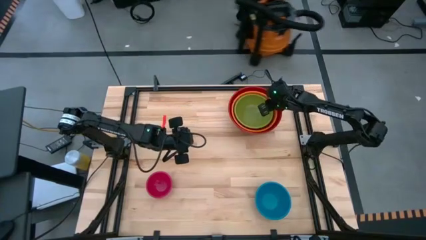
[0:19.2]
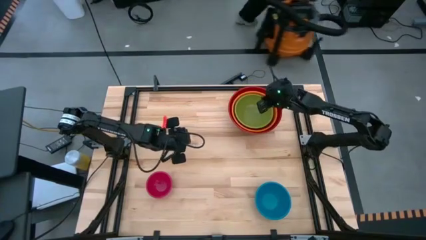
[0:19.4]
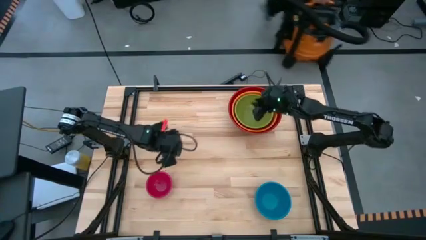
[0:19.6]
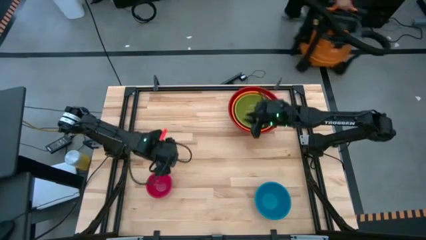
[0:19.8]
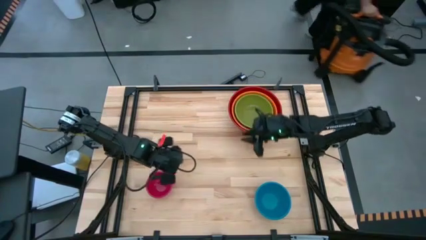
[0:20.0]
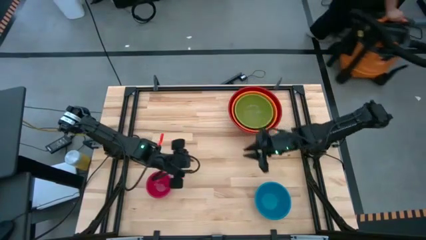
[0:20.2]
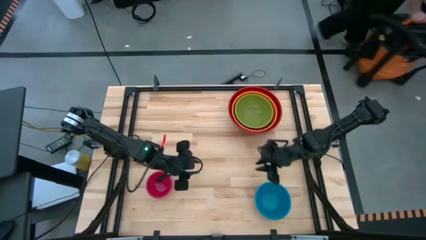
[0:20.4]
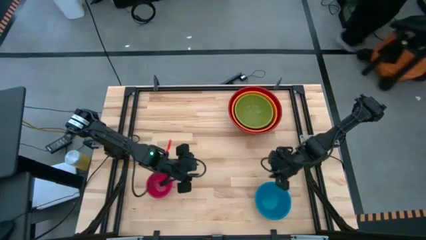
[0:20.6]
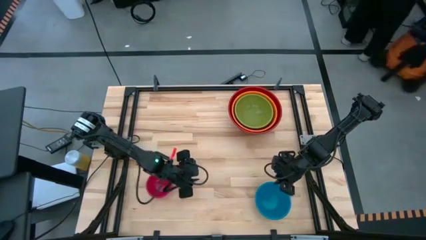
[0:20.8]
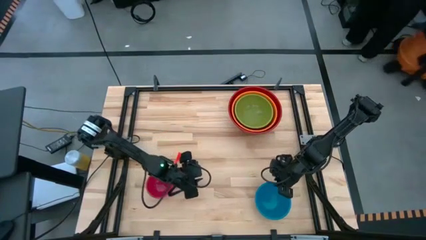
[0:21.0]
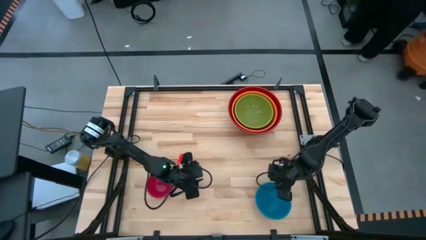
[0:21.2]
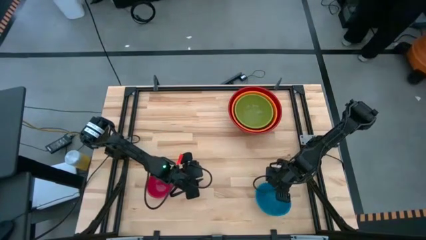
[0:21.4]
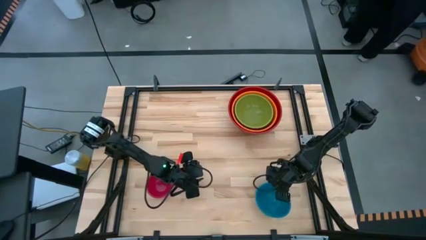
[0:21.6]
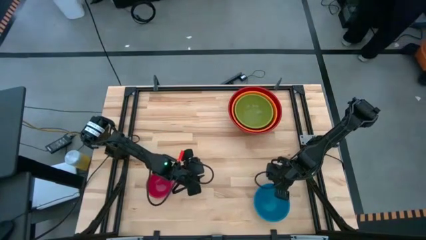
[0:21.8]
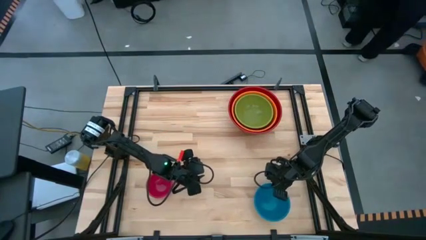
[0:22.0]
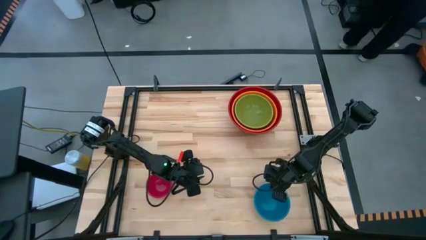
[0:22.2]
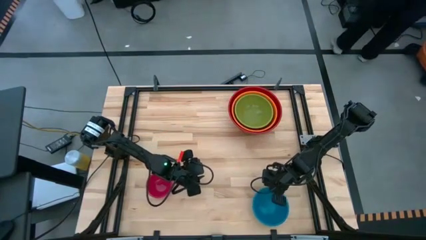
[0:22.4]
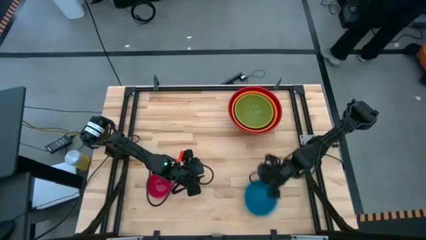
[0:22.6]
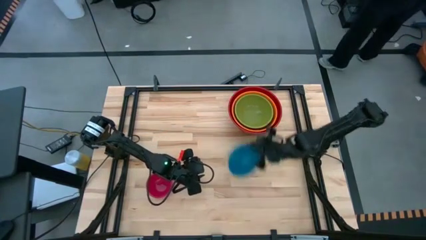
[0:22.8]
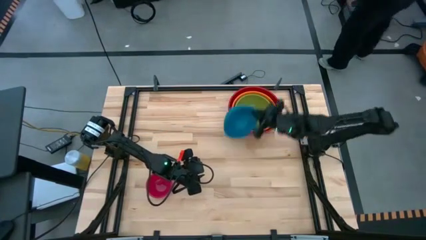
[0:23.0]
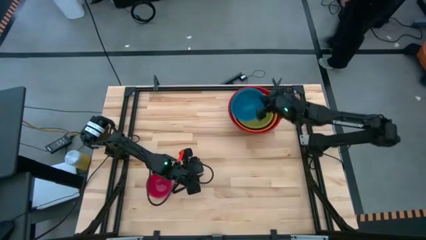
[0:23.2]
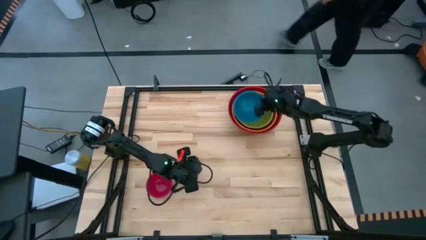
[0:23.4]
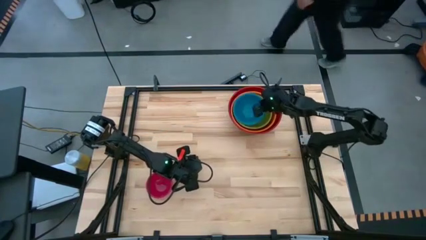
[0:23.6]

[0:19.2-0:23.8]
Stack the blue bowl on top of the green bowl

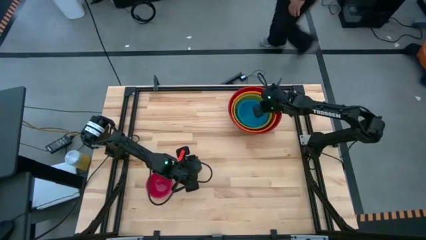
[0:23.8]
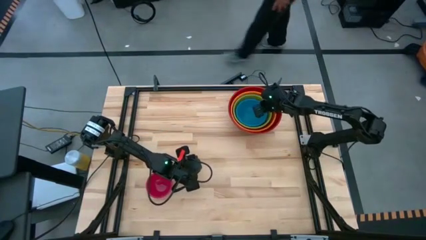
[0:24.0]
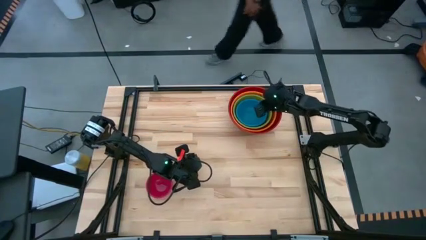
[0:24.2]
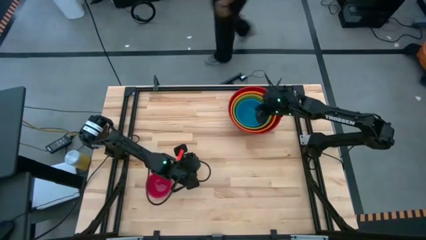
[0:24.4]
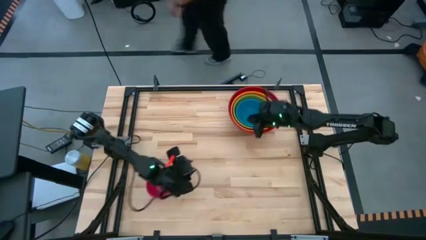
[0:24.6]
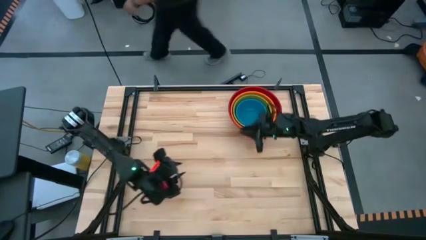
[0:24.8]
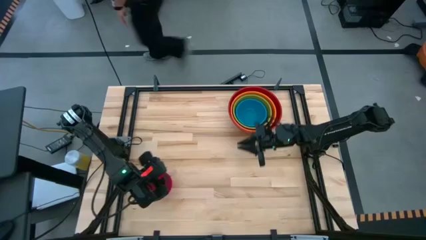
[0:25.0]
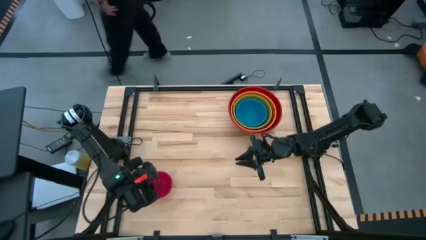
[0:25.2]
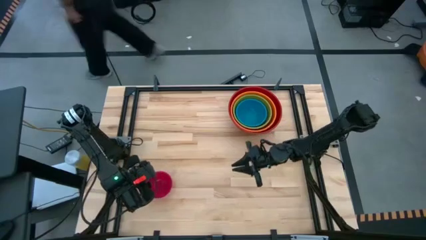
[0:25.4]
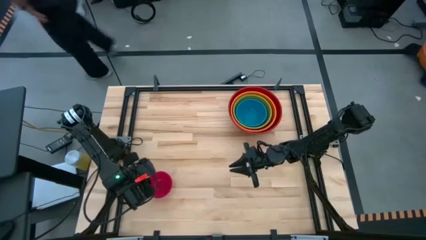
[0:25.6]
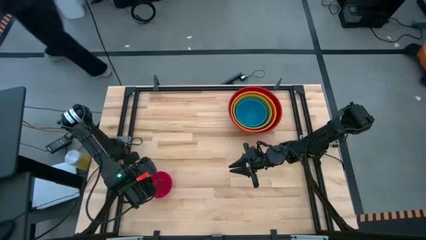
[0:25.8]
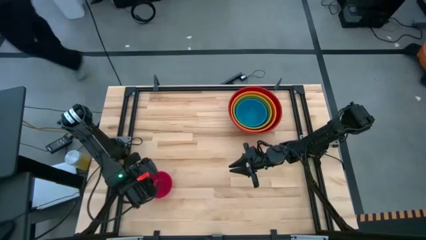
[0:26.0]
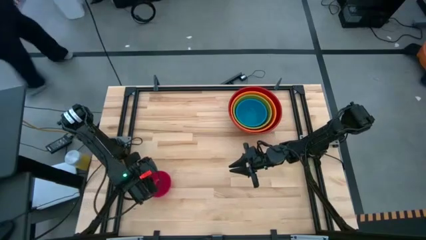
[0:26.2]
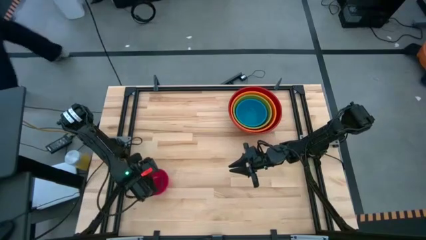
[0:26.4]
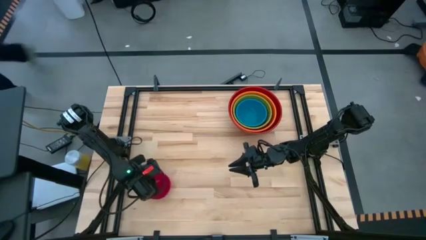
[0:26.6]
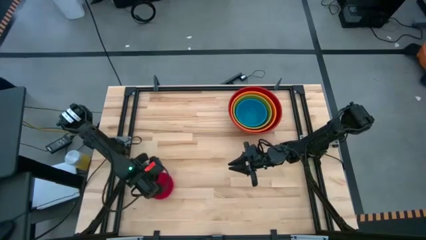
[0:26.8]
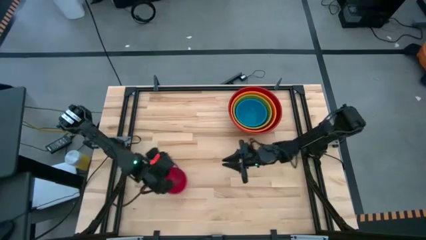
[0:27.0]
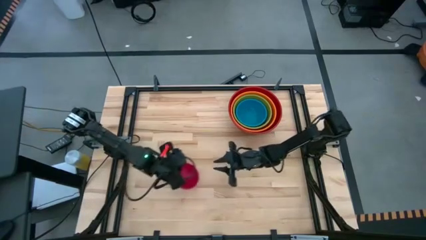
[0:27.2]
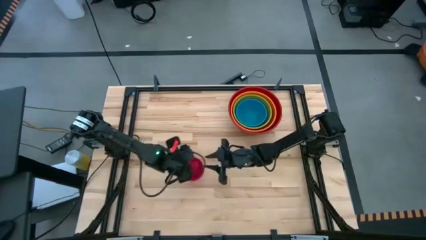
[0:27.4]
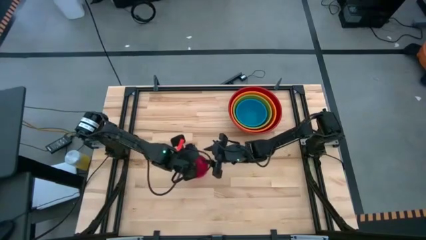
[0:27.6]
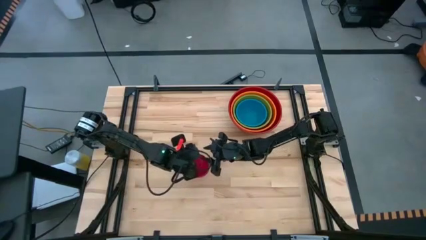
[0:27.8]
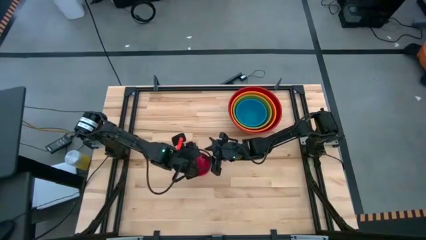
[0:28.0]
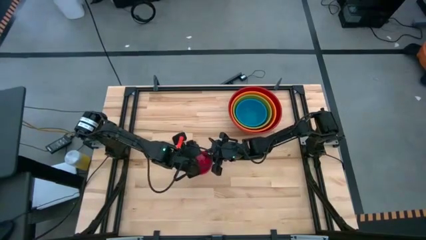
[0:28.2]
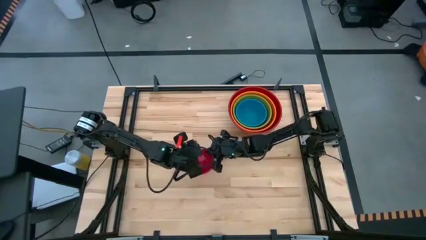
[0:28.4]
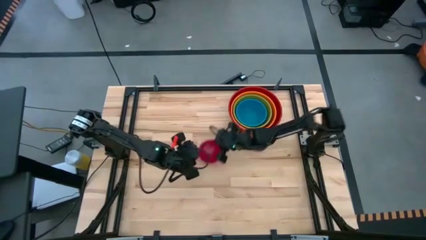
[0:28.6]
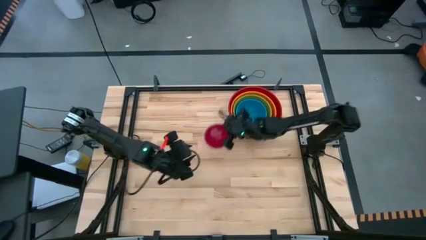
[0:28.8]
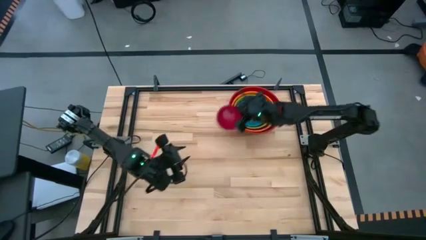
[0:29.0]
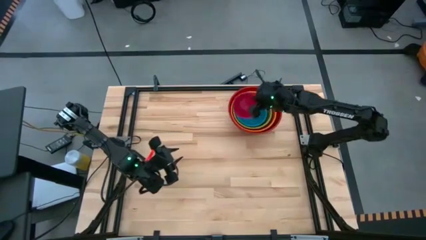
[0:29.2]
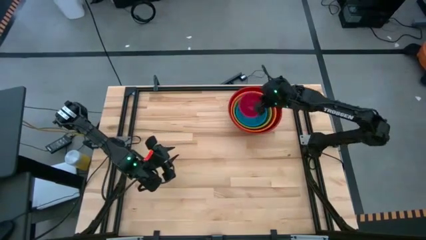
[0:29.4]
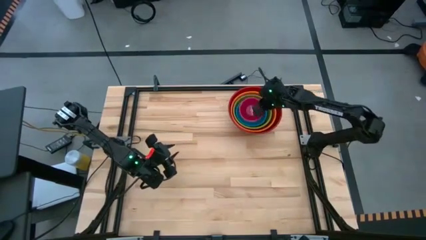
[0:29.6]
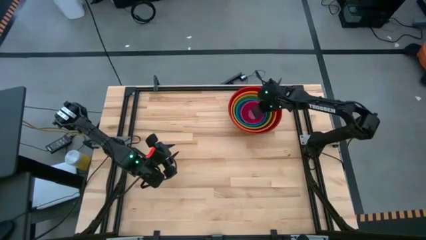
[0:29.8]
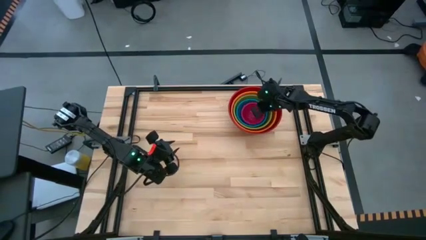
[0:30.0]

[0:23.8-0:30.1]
Stack the small red bowl on top of the blue bowl

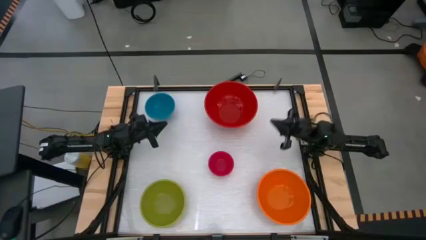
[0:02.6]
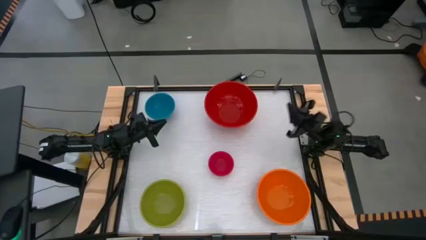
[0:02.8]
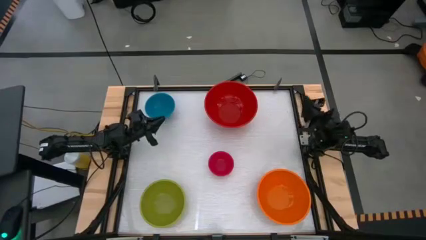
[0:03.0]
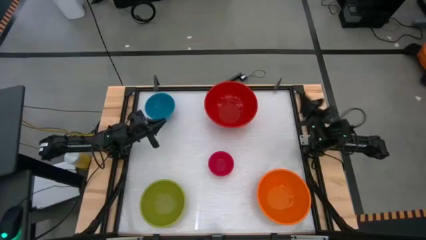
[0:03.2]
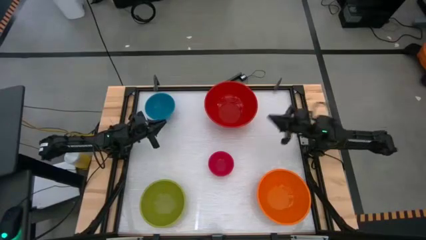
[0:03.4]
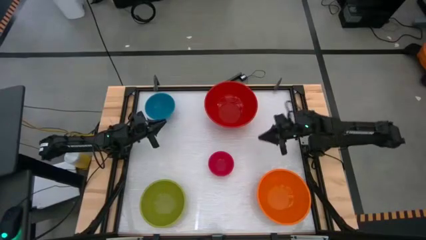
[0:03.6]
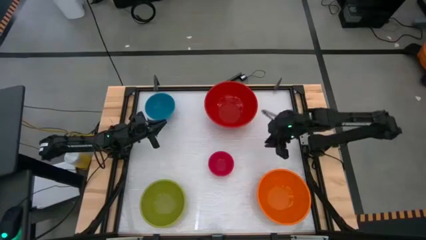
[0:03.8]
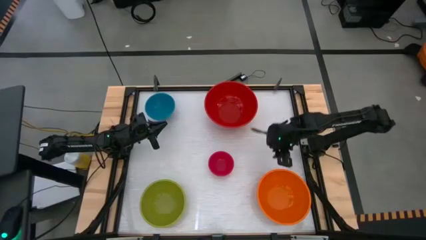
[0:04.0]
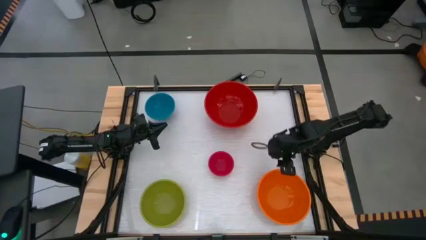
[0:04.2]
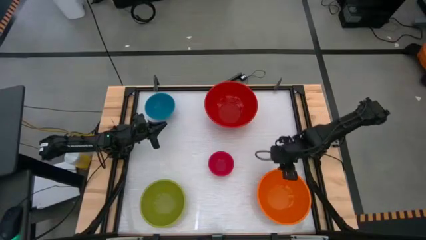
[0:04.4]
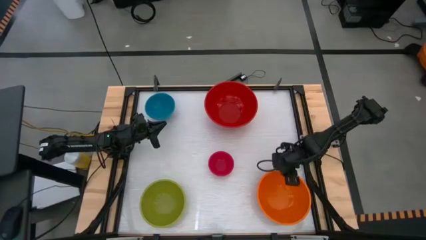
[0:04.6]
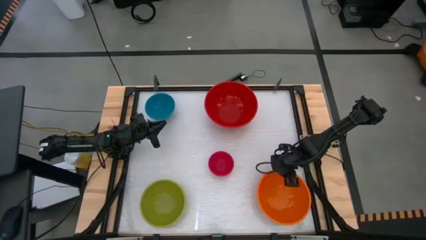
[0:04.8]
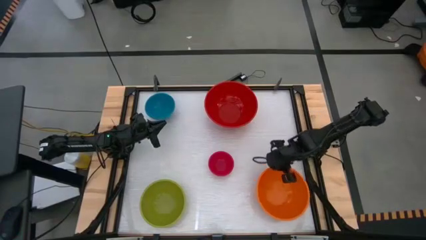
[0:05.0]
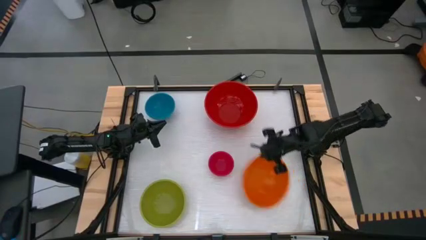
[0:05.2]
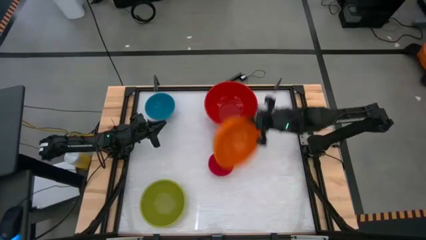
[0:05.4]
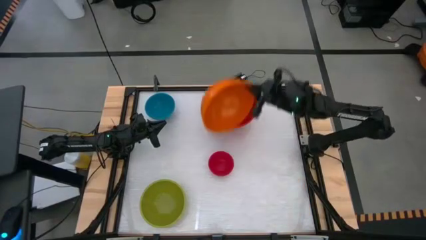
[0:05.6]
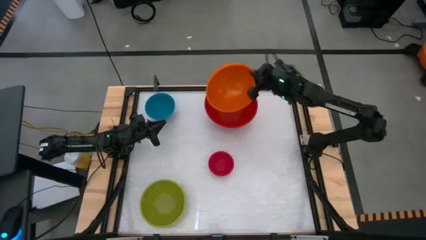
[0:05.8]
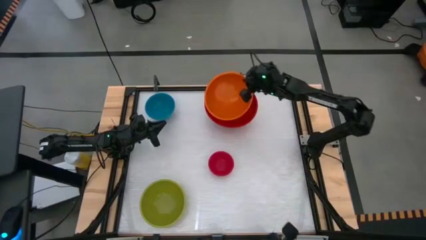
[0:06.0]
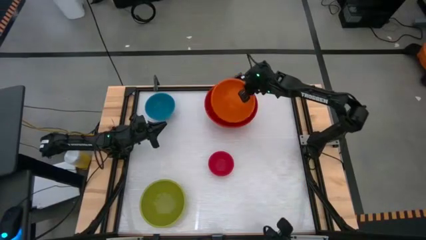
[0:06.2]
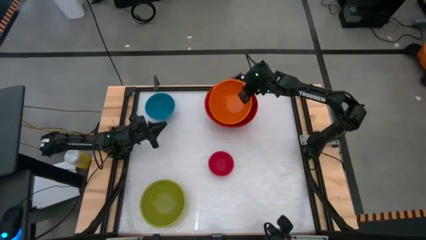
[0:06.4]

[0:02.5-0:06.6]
Stack the orange bowl on top of the big red bowl
